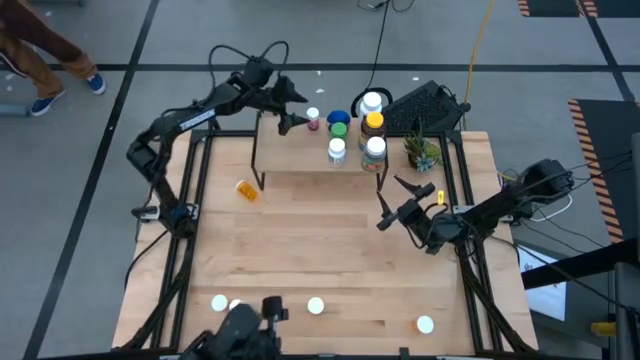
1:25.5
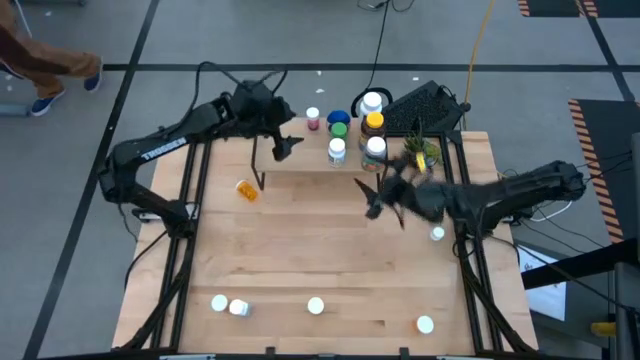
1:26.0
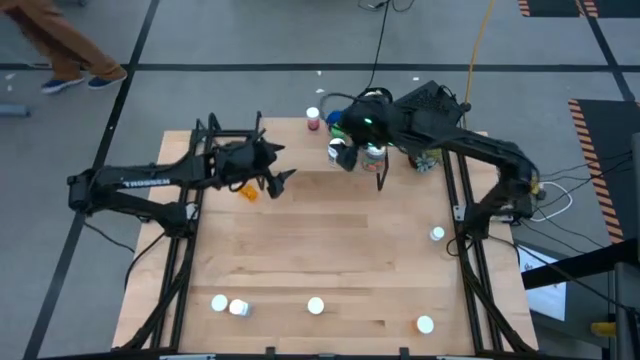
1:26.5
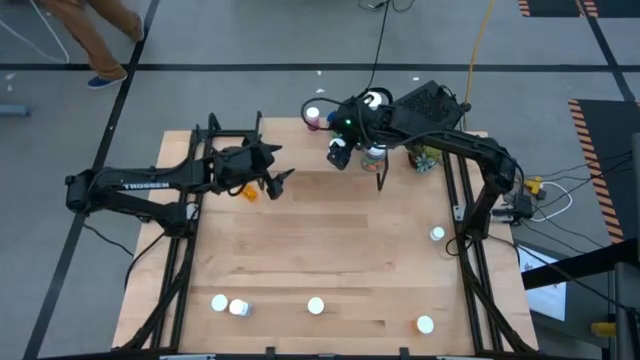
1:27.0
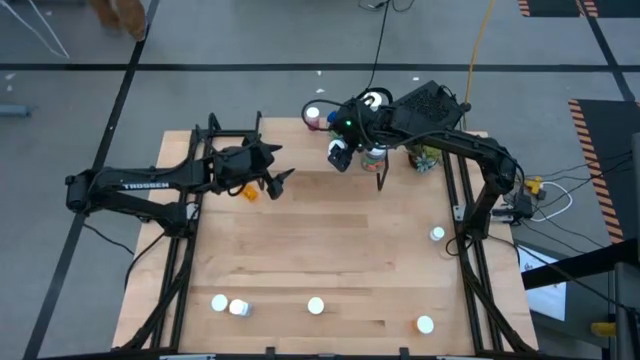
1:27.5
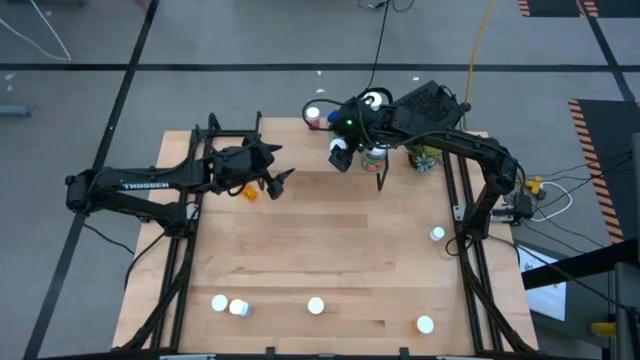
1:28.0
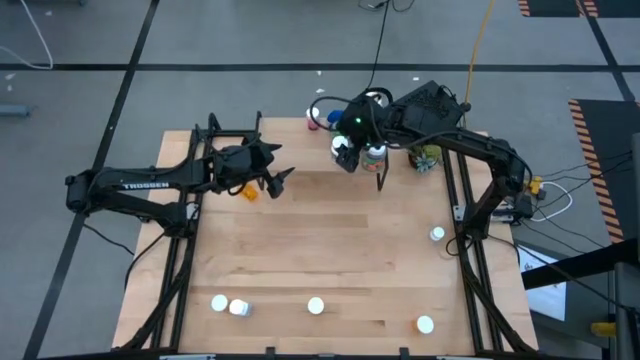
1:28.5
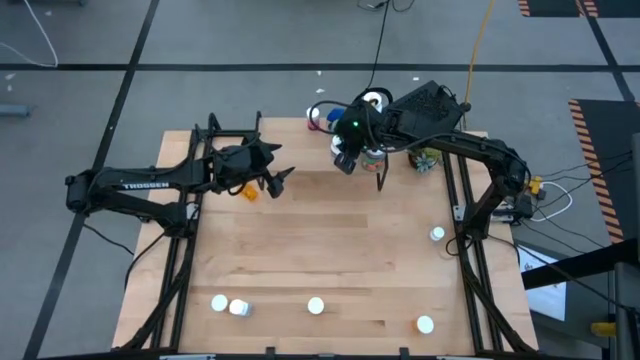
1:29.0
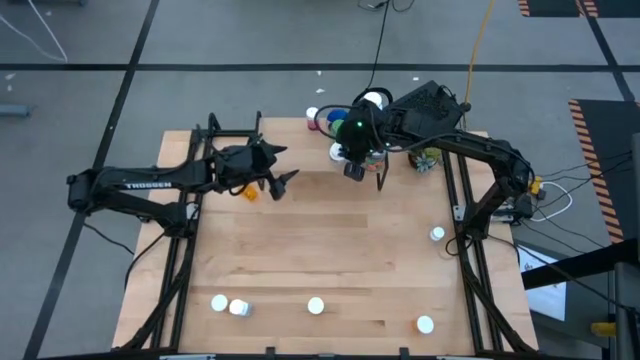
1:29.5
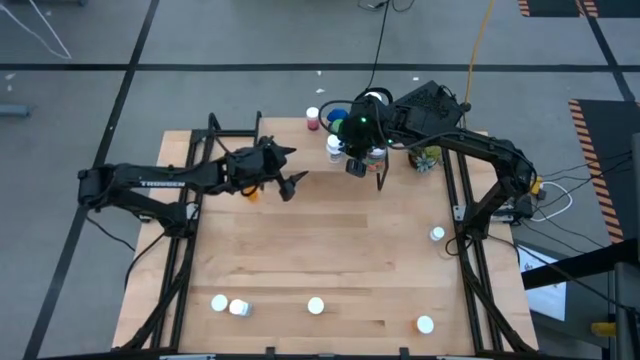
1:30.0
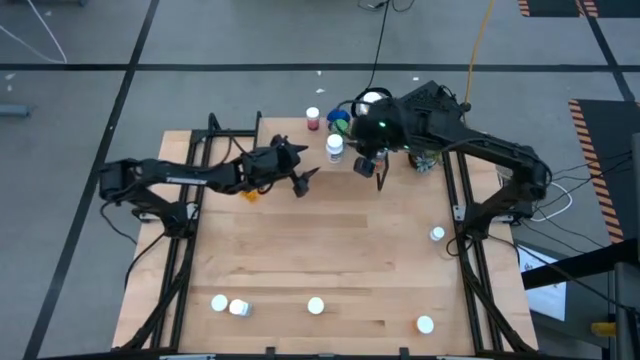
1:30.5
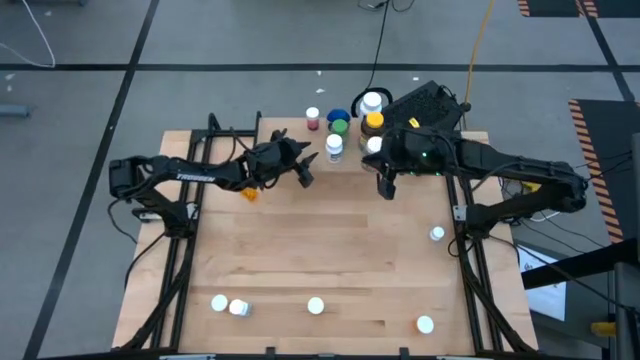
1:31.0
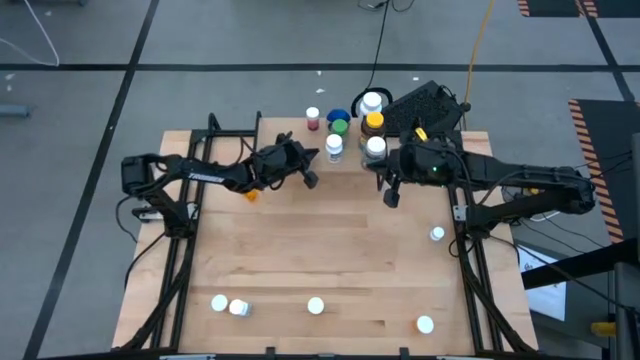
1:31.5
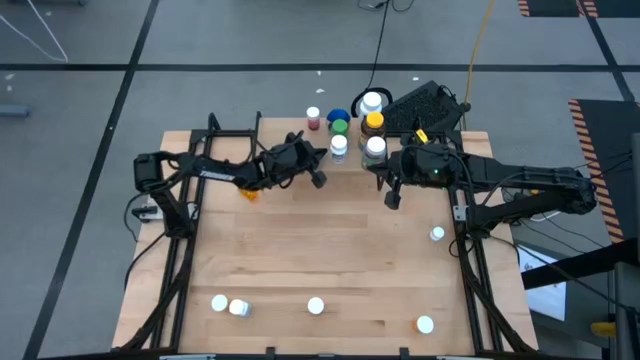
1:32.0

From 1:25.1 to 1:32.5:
Task: Pick and place medicine bottles onto shelf by color
Adjust the white pill bottle on the shelf

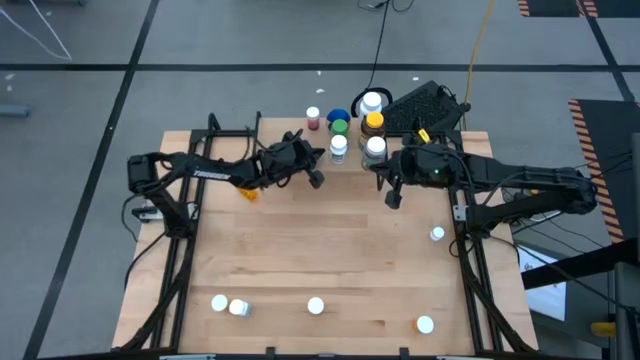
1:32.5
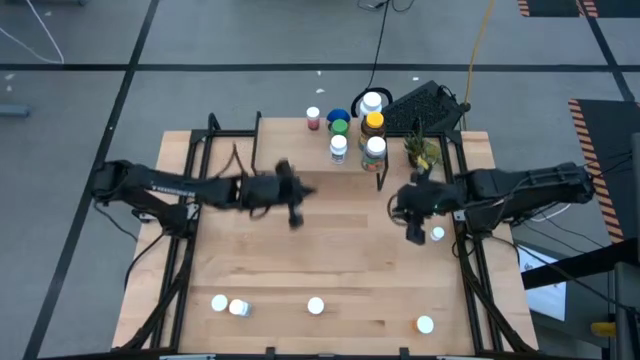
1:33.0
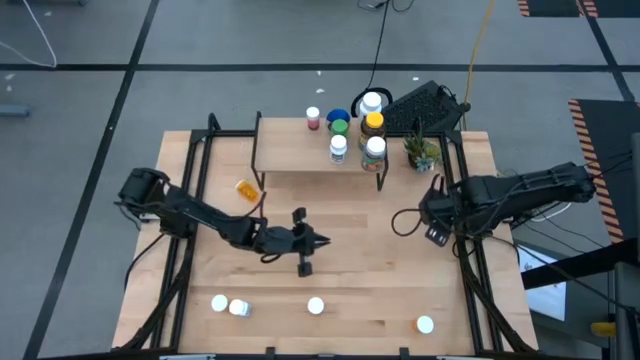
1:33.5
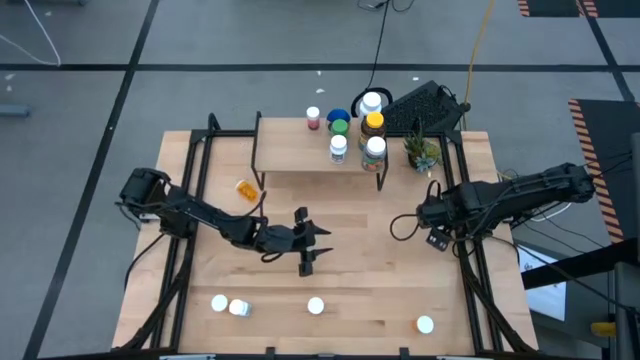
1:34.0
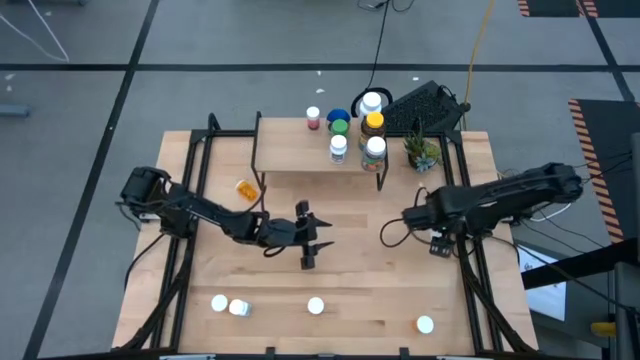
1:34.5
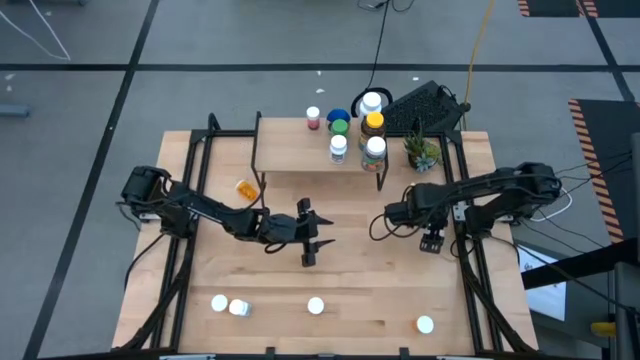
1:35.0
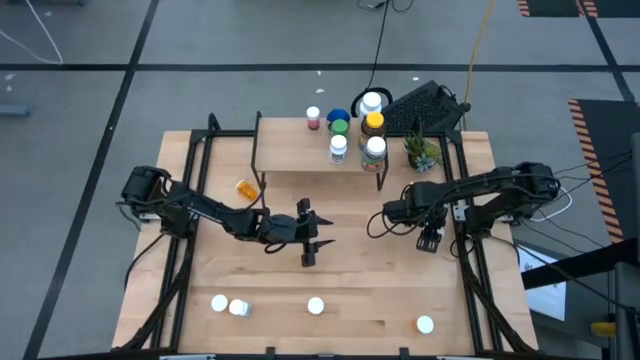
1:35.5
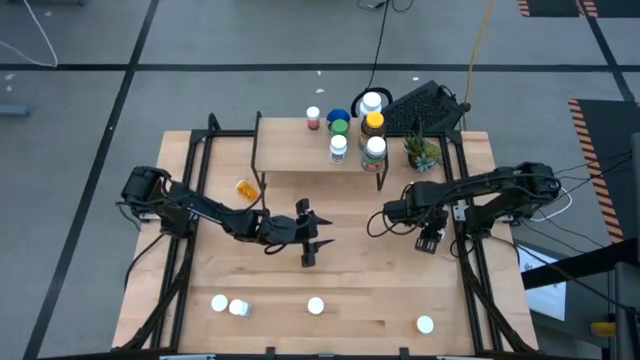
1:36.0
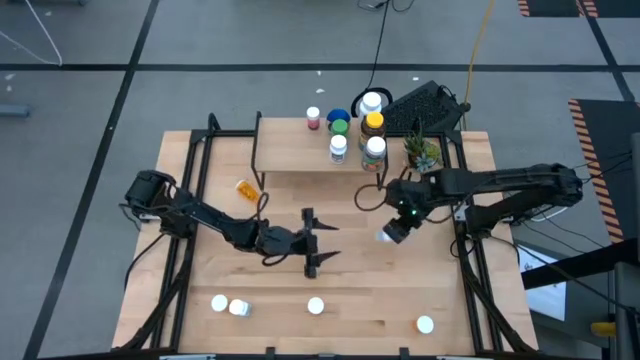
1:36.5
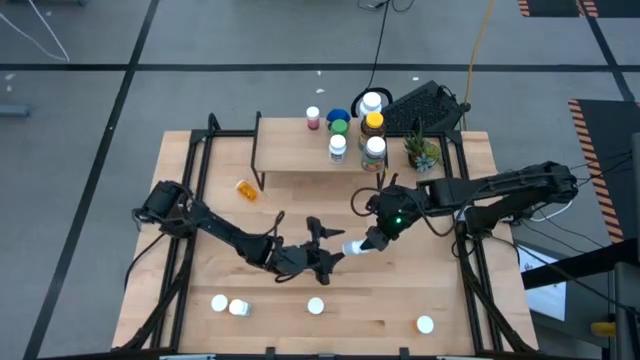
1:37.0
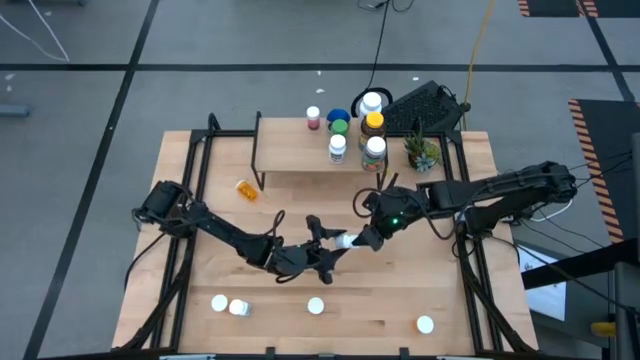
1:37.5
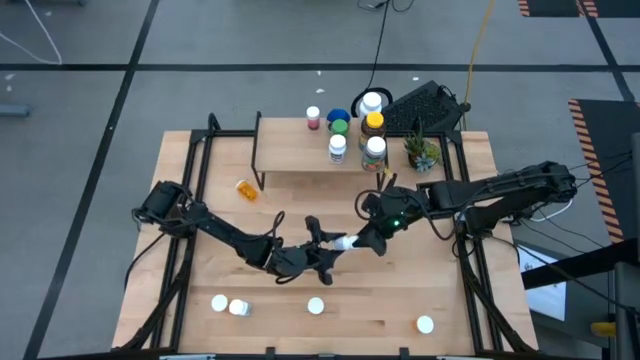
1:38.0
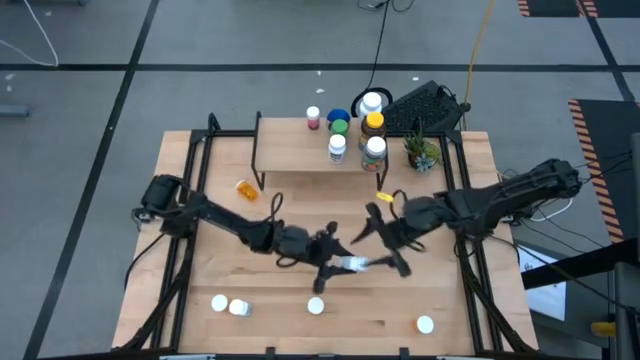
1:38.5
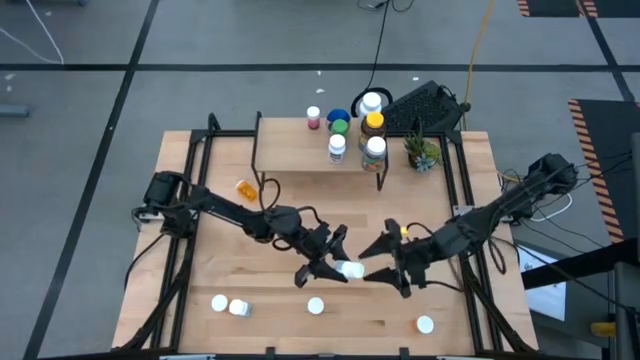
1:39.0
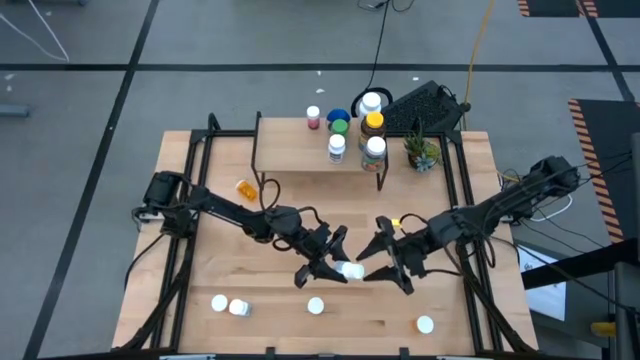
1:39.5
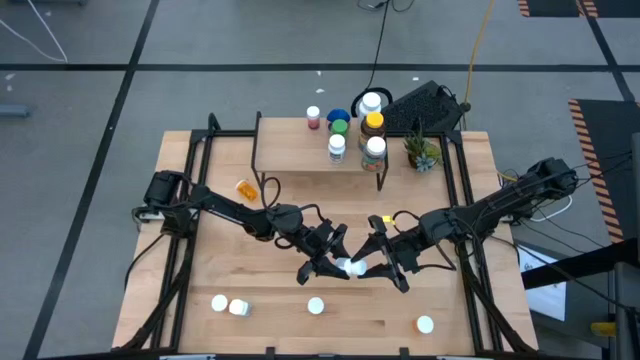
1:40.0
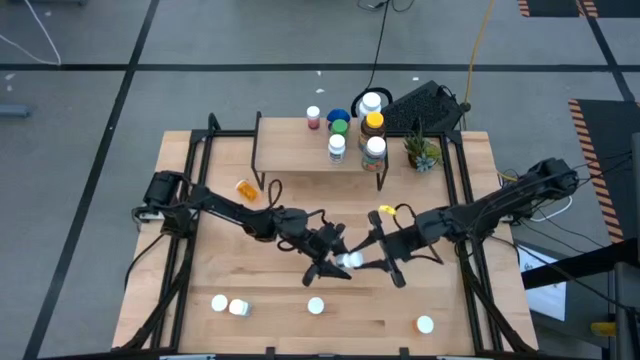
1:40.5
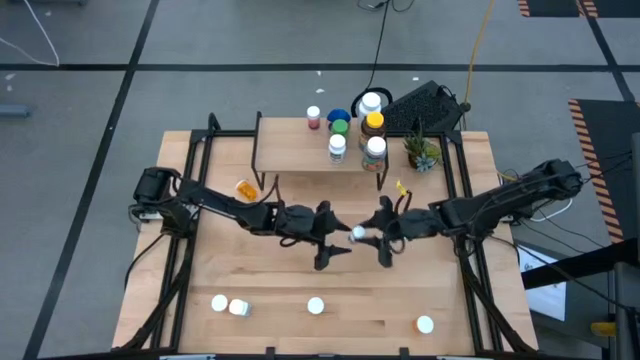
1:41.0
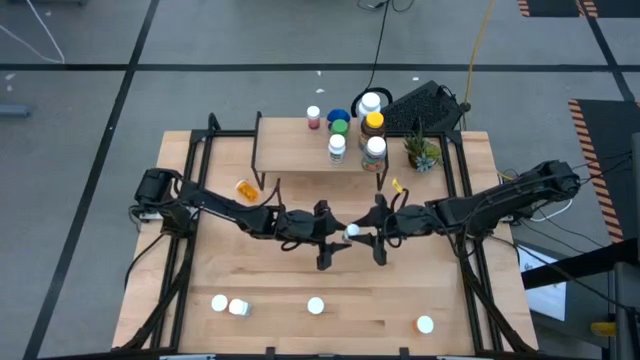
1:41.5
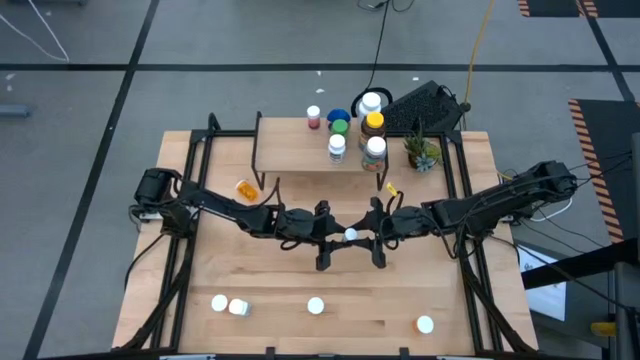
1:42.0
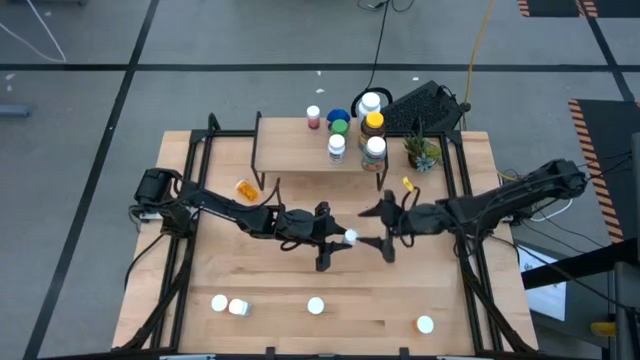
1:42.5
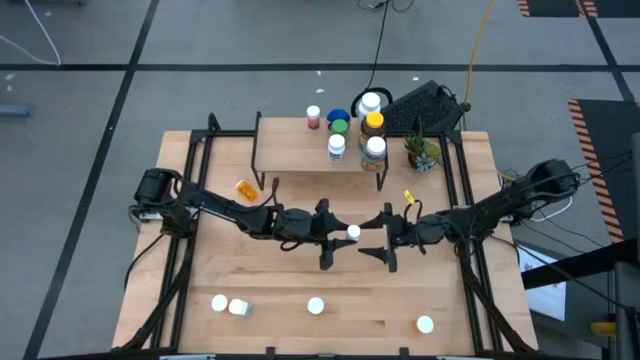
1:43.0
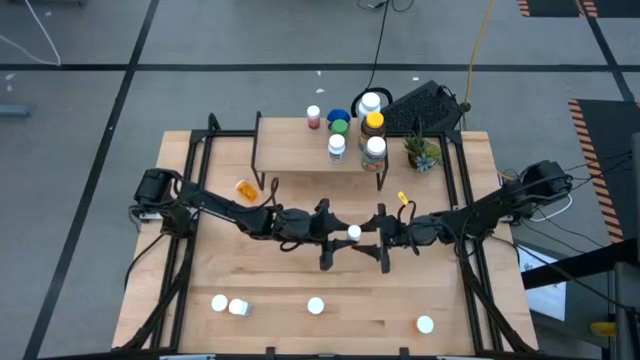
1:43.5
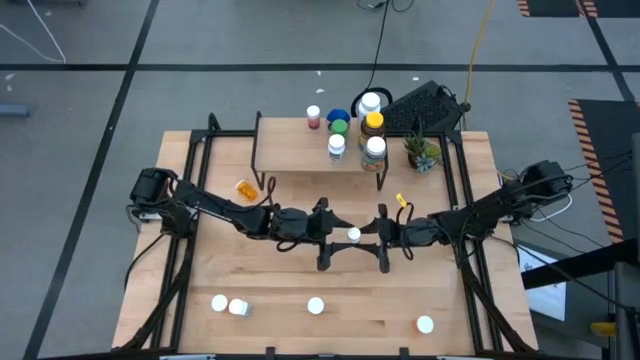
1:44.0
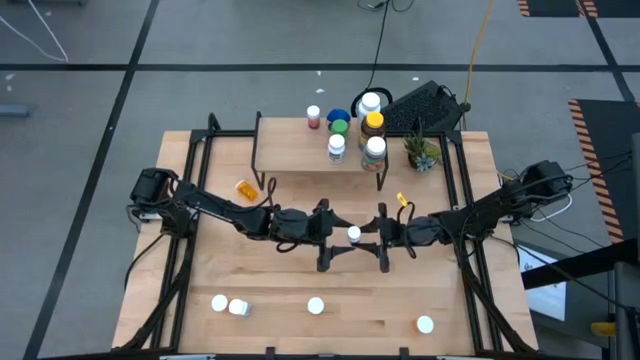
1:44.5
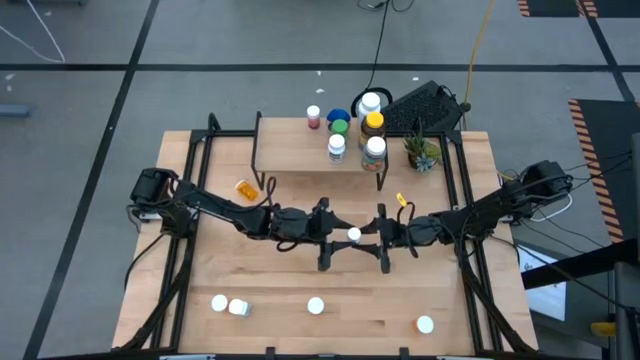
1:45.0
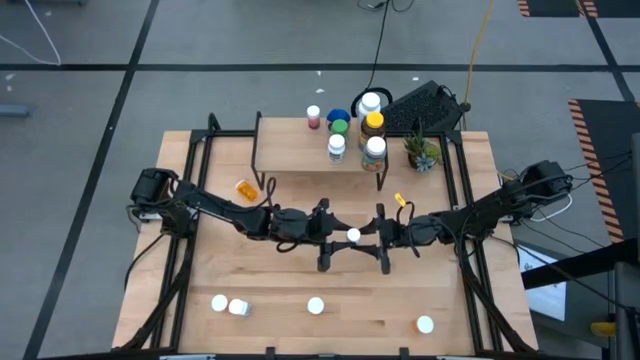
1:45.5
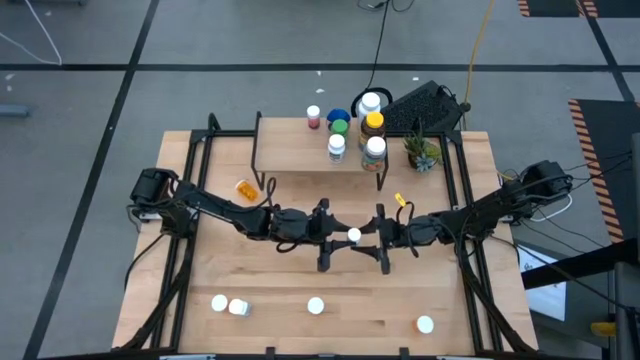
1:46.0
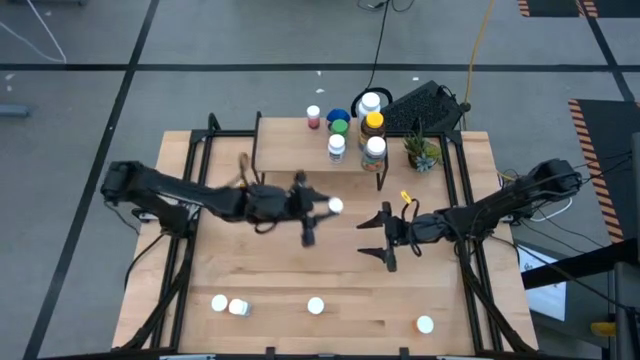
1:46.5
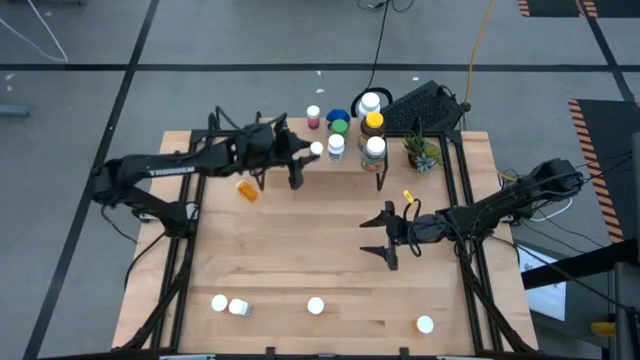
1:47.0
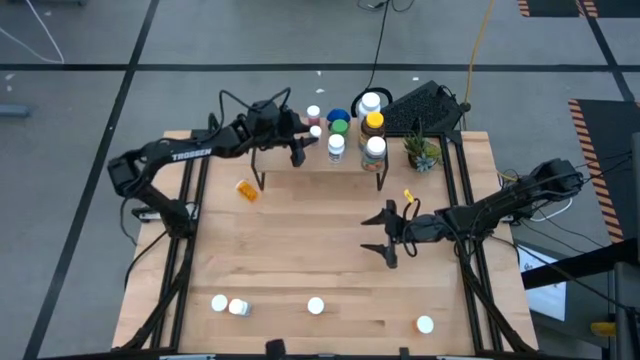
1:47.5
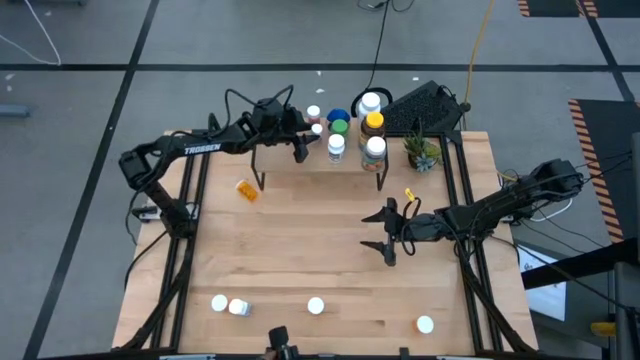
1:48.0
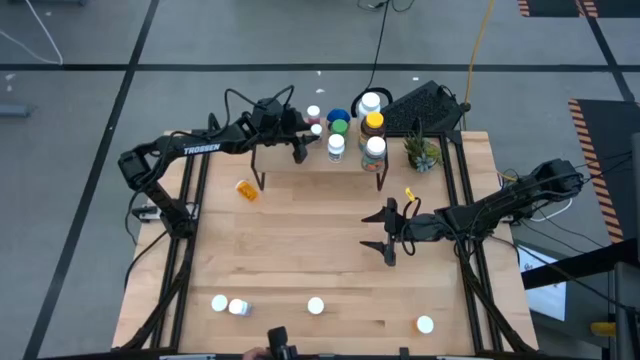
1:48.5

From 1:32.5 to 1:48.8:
Put the white black pill bottle on the shelf
